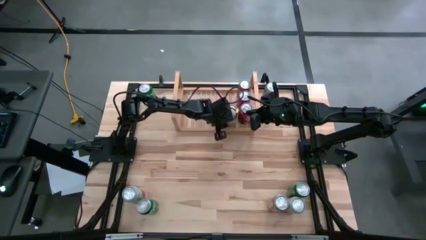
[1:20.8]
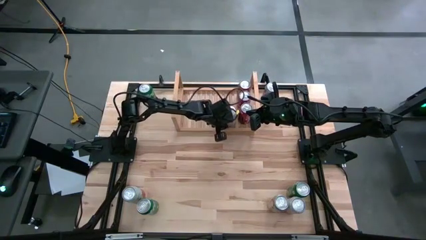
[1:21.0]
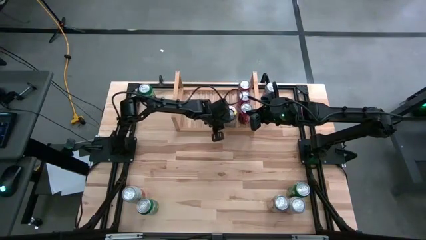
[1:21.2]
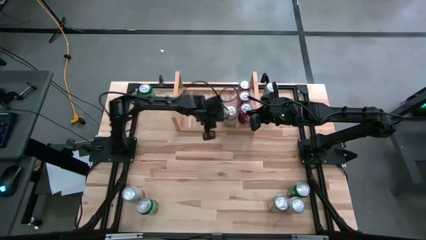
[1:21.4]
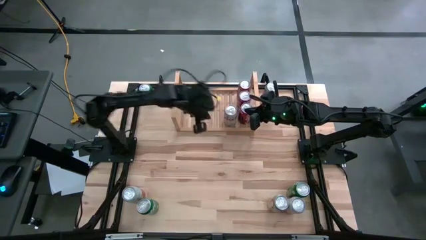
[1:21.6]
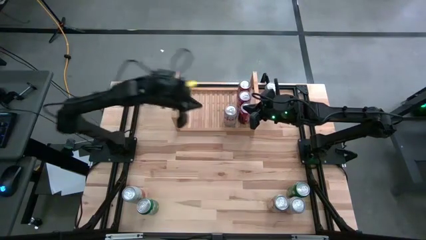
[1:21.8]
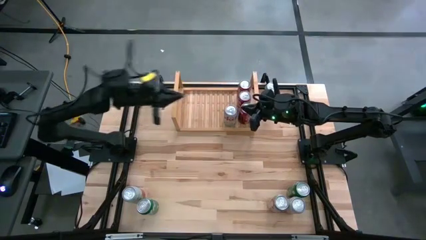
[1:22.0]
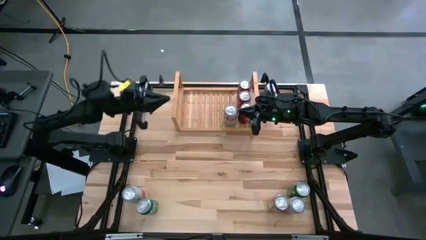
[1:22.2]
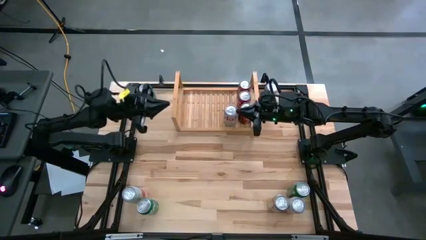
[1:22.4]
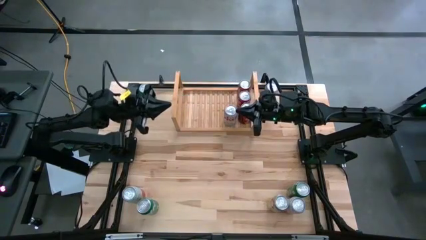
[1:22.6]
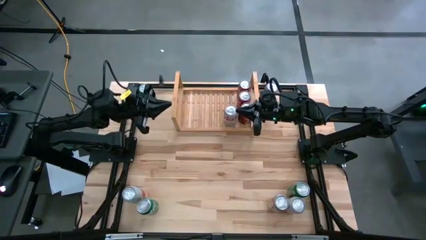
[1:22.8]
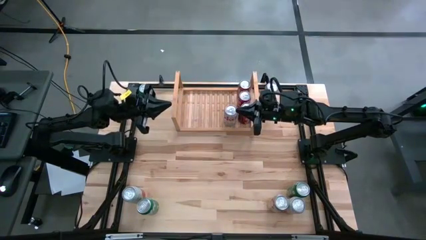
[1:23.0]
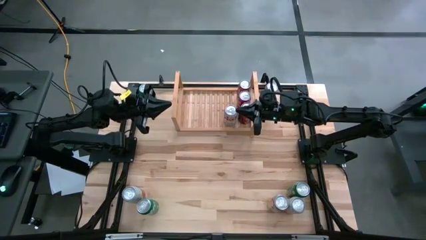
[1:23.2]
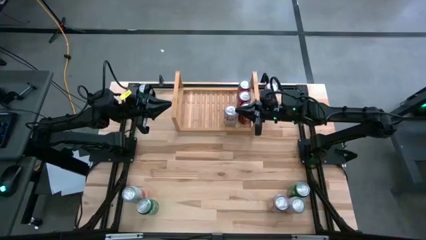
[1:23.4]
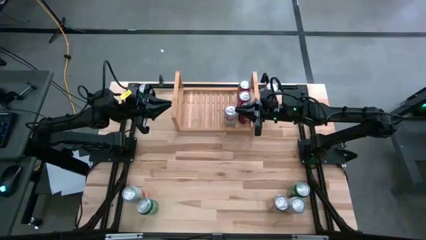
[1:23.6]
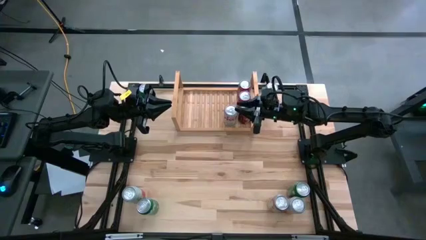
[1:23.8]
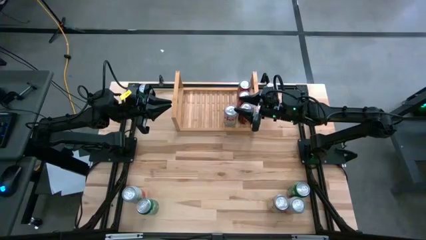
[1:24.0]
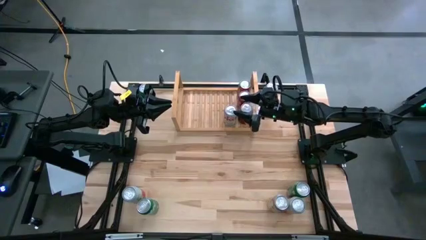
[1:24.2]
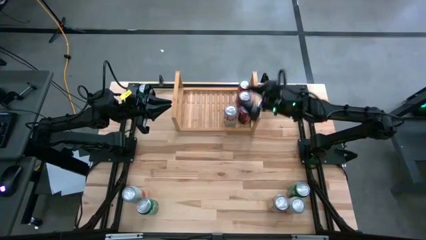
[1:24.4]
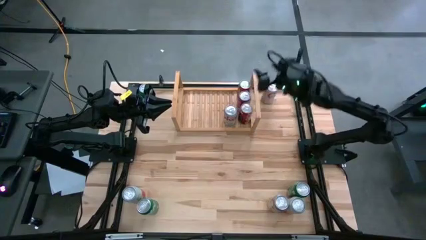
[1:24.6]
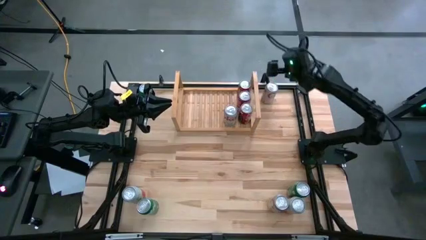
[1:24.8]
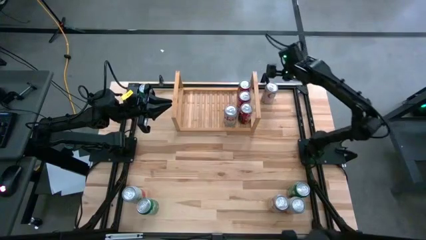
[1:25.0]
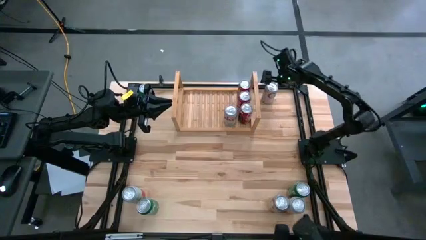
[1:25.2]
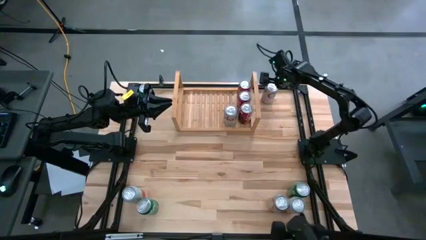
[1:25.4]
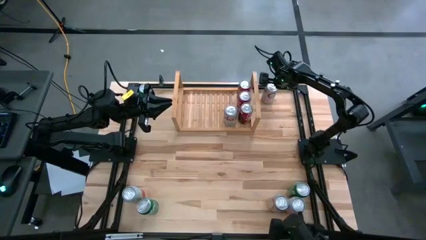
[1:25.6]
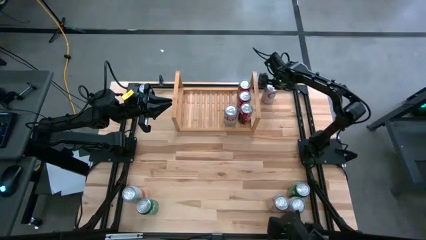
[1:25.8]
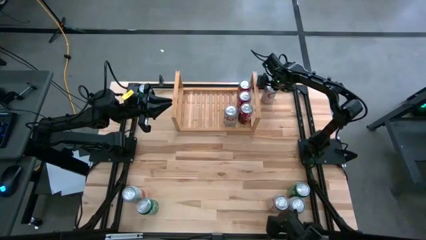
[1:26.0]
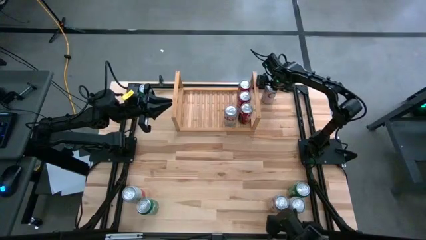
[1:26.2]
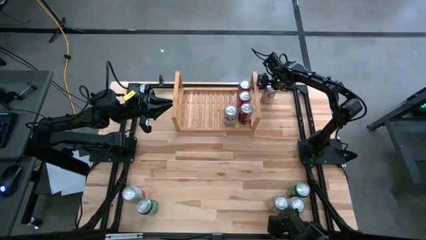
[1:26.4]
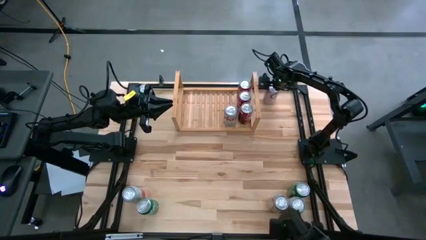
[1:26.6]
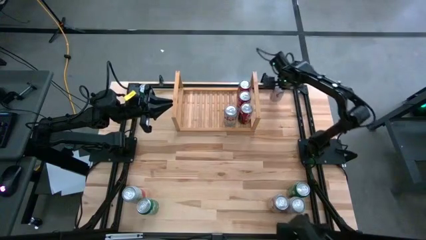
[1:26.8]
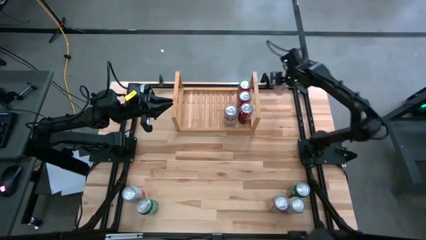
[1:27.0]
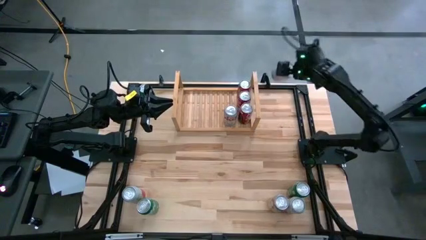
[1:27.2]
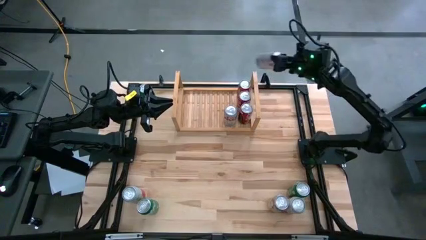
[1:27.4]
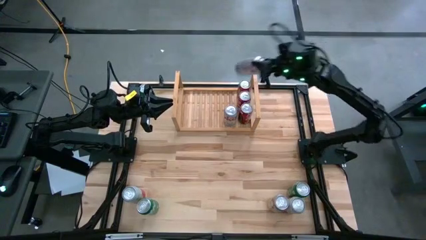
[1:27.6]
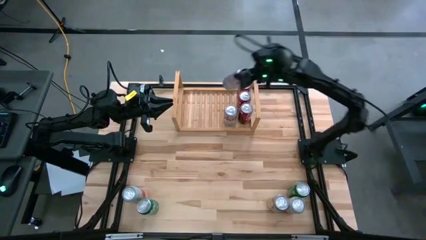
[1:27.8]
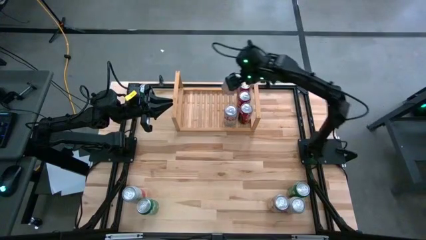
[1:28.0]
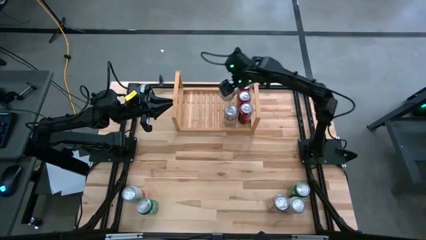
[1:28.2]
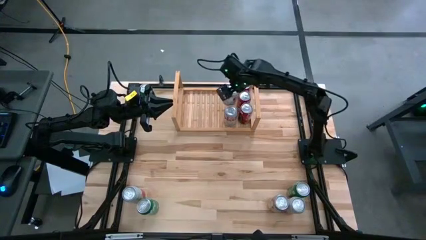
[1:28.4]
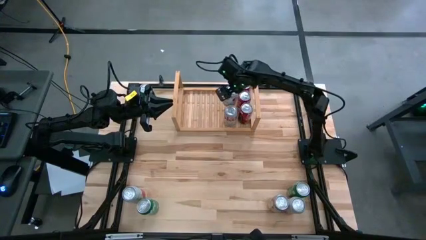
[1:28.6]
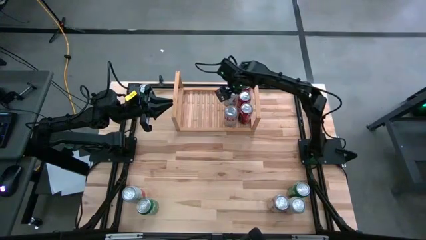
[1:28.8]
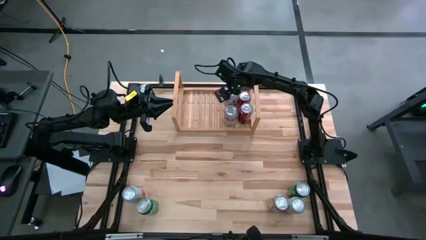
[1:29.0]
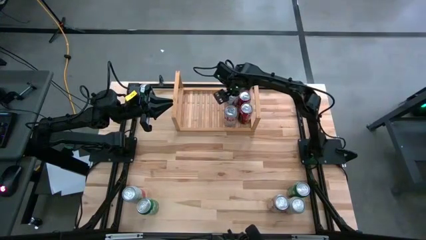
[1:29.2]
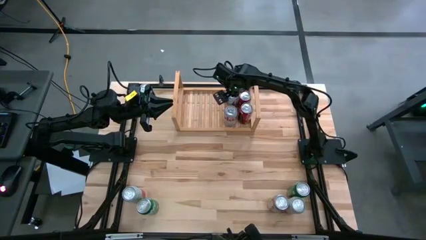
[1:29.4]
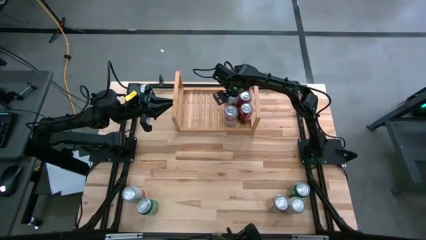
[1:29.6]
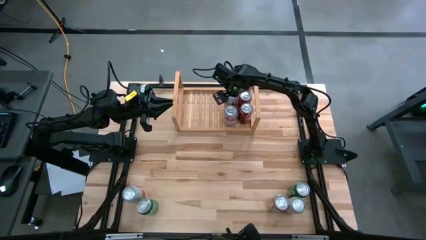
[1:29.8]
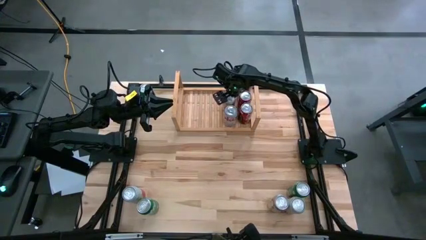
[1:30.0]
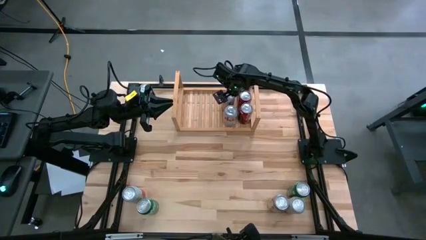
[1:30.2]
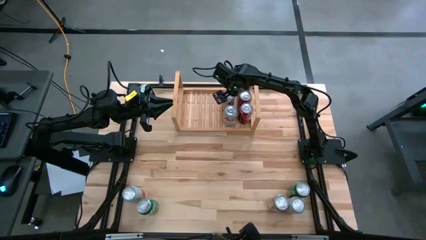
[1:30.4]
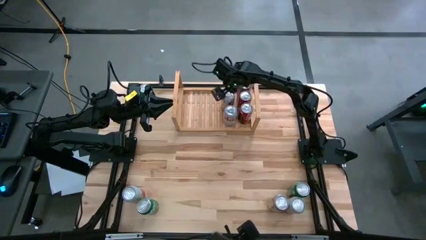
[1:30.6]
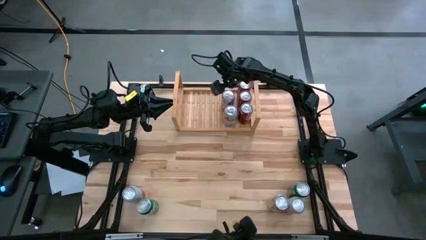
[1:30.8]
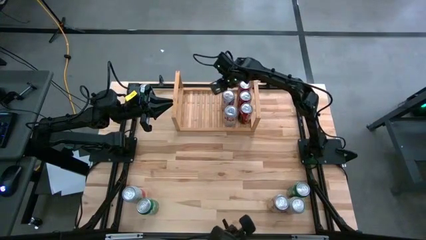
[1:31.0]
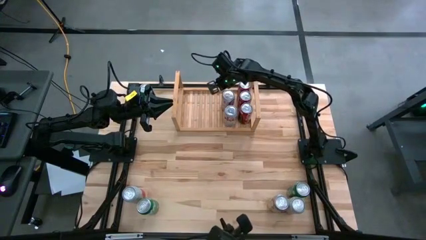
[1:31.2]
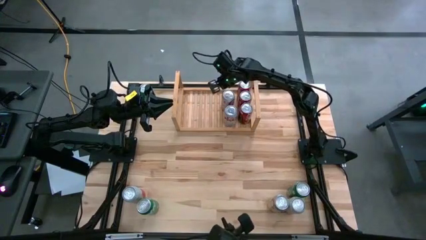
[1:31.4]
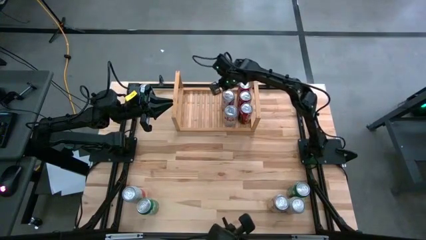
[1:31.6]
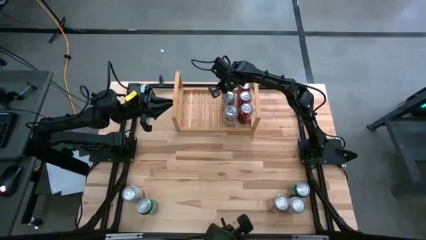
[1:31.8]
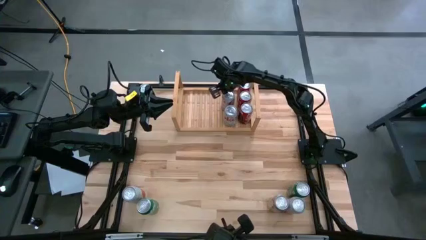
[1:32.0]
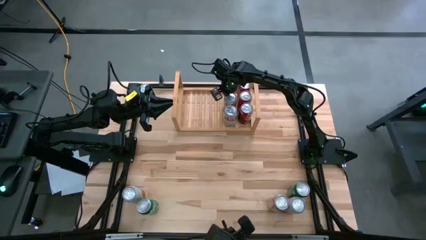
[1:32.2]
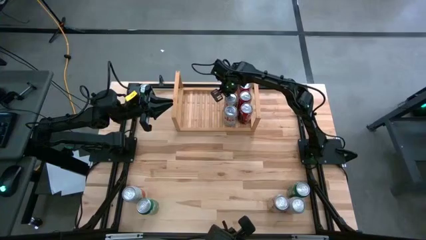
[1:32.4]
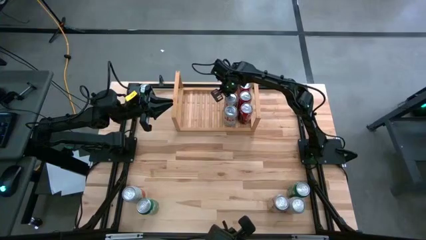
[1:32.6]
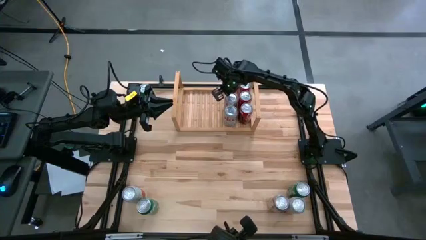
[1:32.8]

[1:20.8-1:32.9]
Task: Place canned beverage on shelf
Put the top red-silver soda can aligned with the other red-silver soda can on the shelf

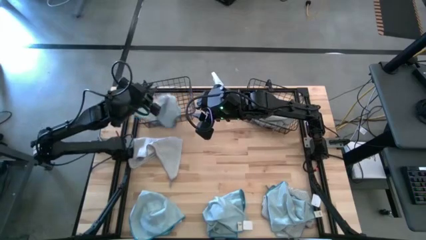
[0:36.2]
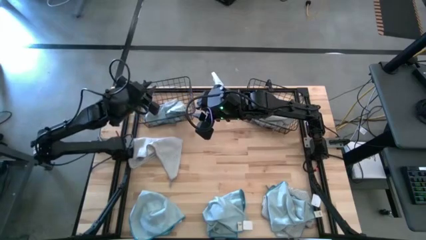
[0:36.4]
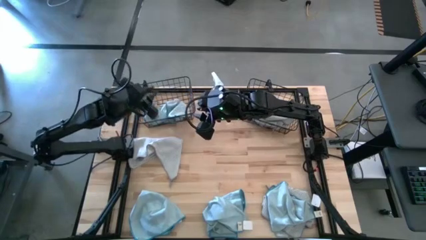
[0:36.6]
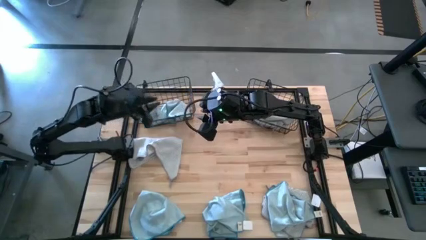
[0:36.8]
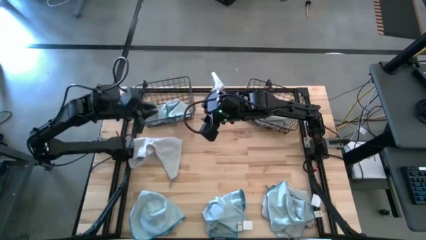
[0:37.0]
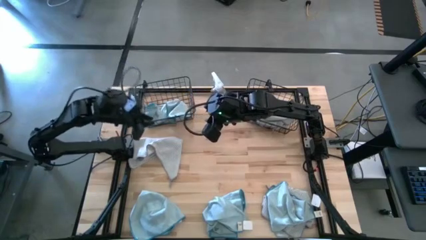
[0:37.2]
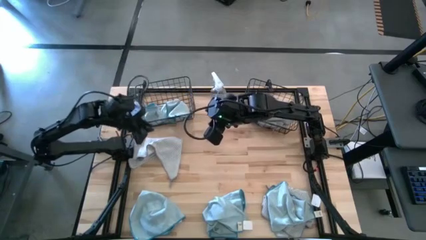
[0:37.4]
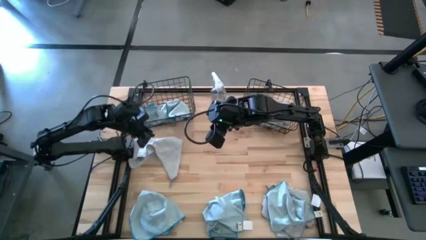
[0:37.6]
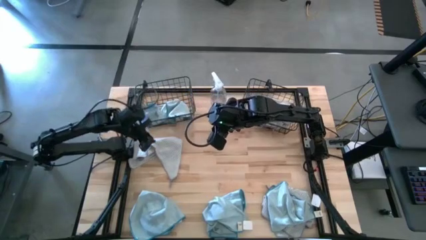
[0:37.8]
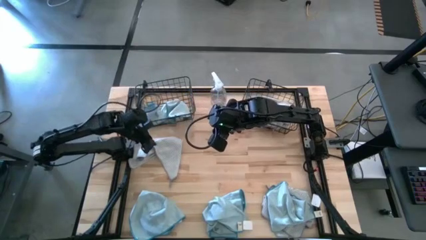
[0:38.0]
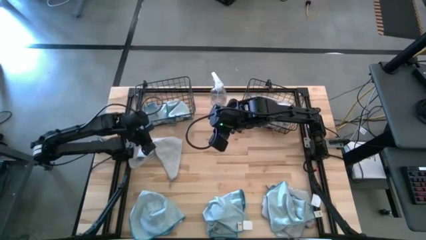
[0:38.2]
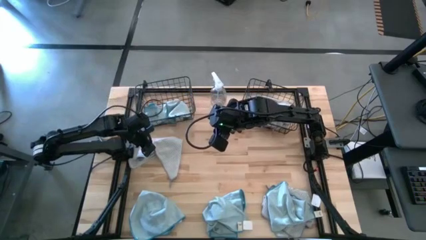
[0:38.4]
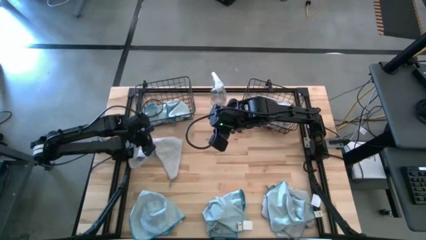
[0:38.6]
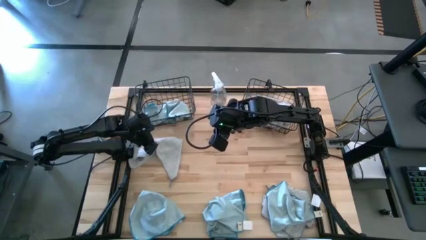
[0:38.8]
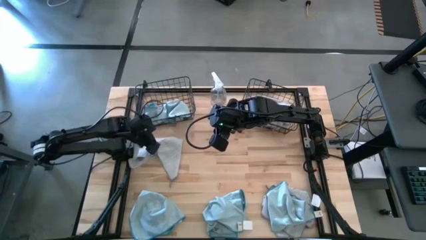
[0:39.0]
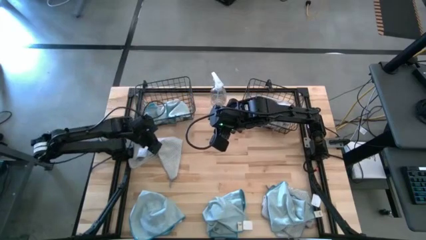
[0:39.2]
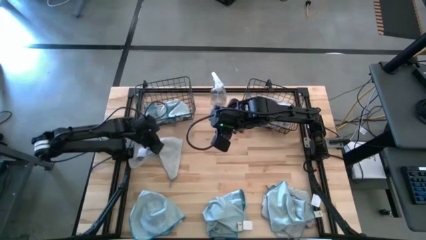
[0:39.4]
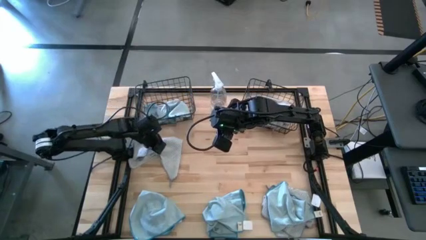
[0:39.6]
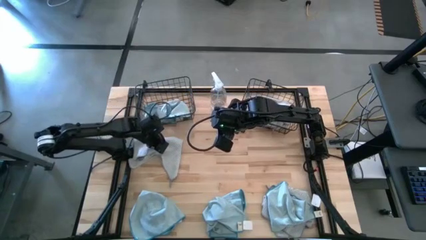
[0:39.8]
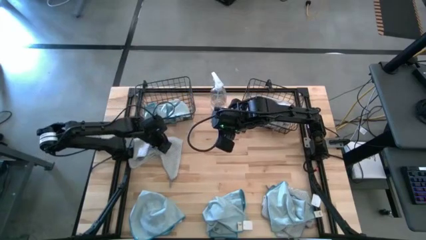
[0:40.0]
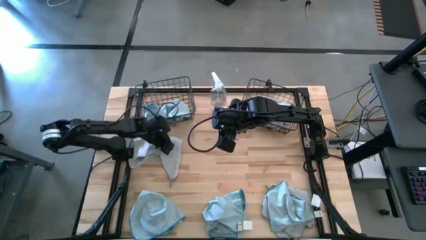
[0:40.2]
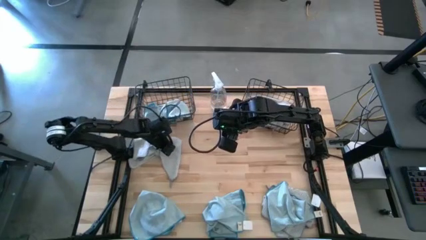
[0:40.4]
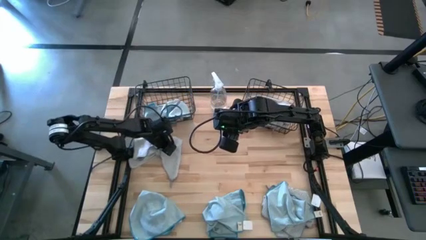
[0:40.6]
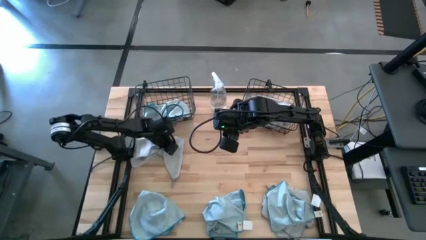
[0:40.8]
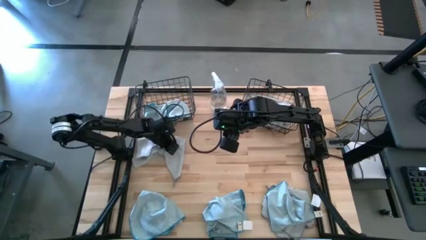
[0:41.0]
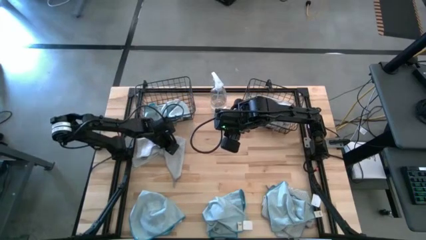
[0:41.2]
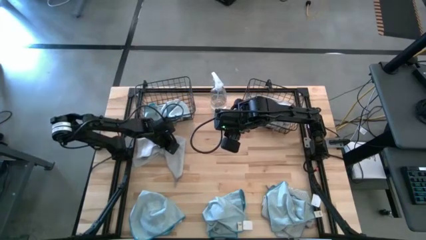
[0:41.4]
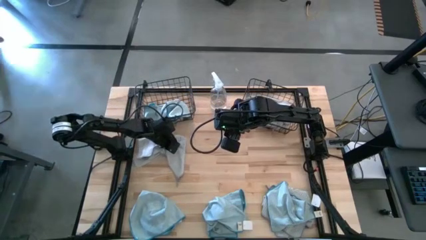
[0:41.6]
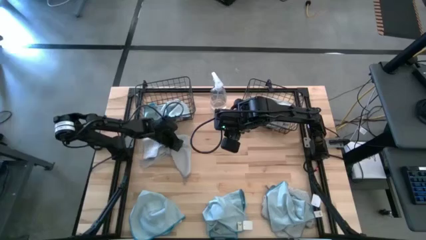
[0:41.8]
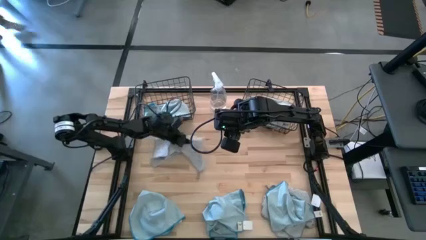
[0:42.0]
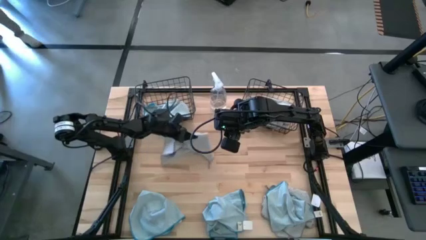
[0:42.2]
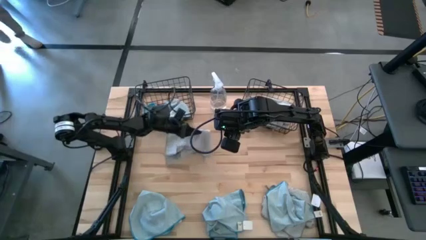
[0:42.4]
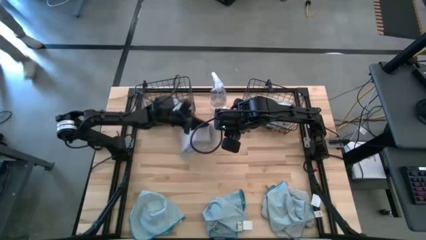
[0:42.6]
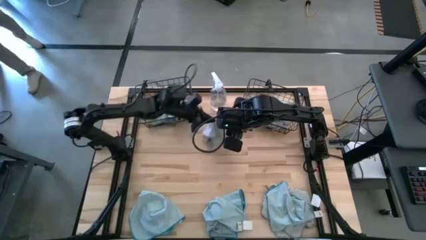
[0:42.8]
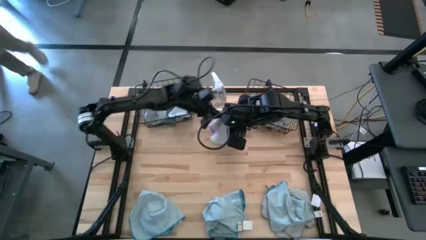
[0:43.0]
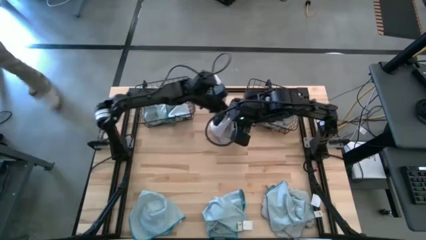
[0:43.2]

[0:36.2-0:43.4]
Task: Sort microfiber towel by color & place in baskets
Put the gray microfiber towel into the right black wire basket
